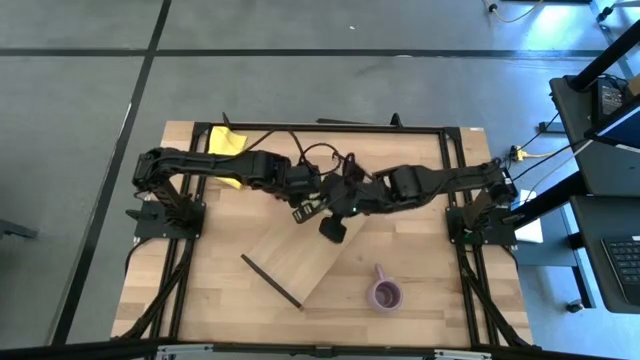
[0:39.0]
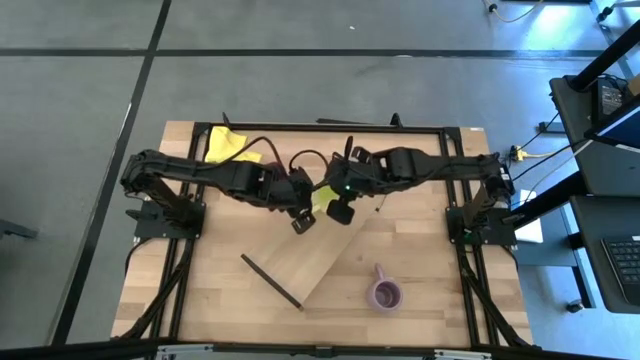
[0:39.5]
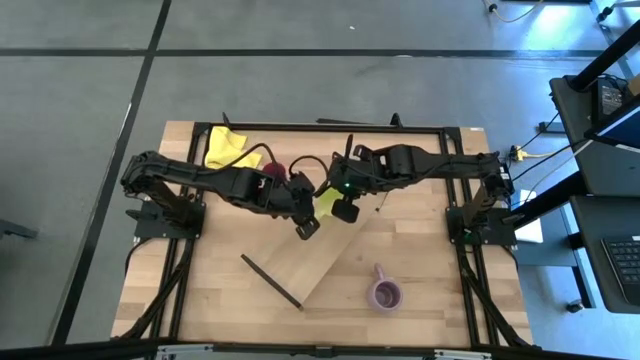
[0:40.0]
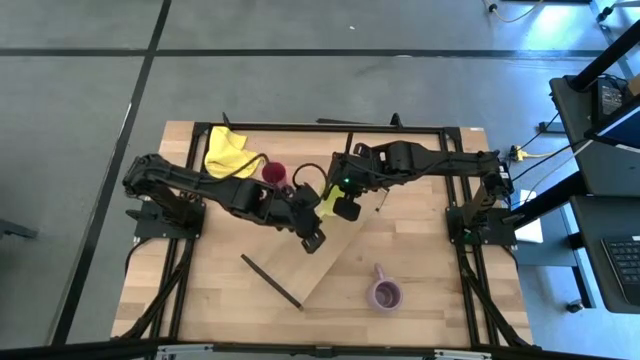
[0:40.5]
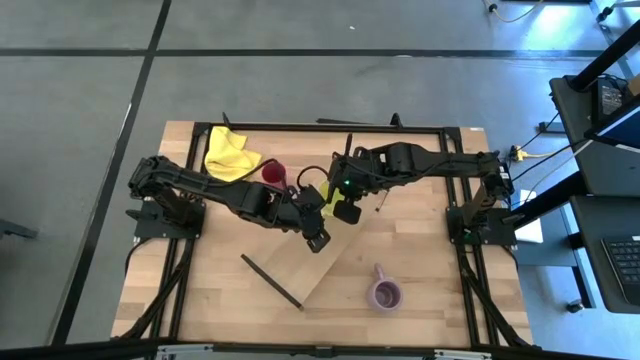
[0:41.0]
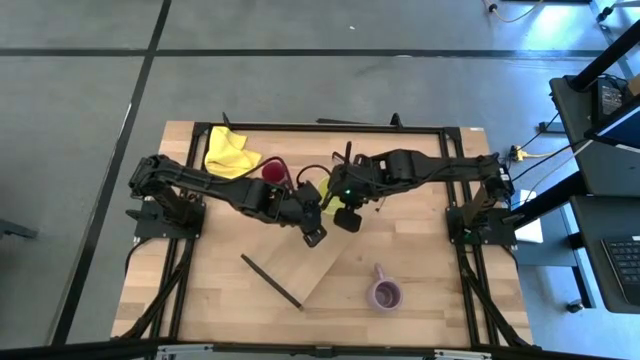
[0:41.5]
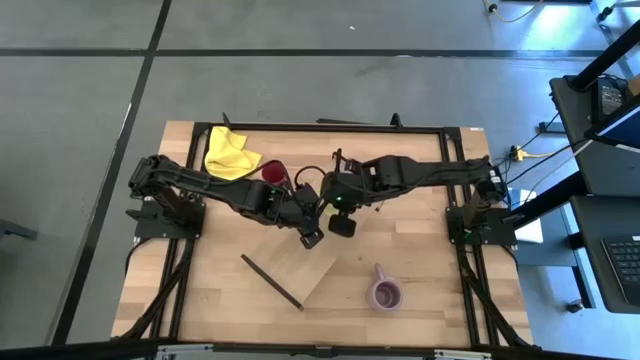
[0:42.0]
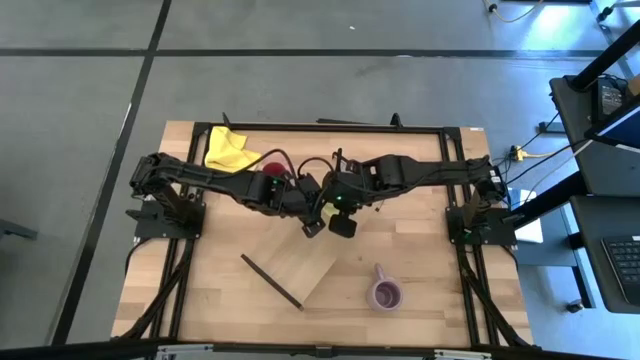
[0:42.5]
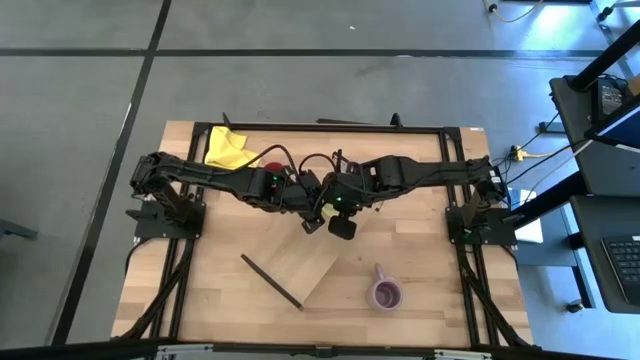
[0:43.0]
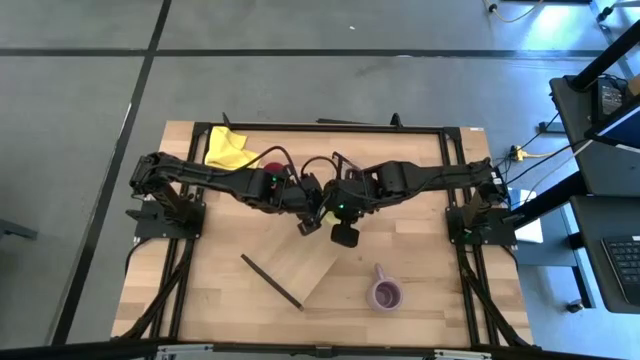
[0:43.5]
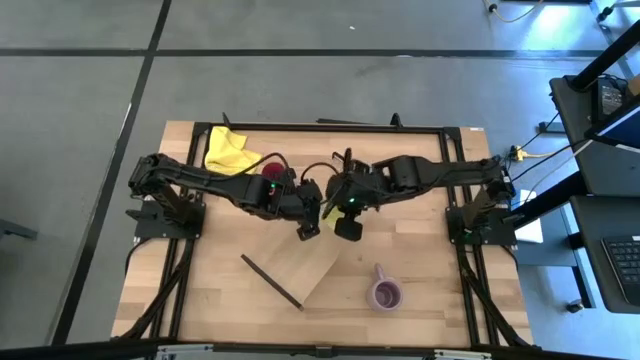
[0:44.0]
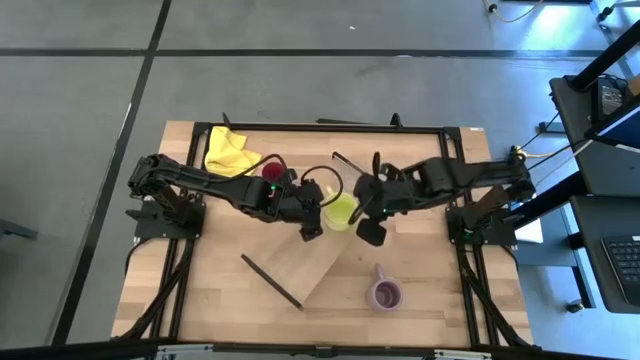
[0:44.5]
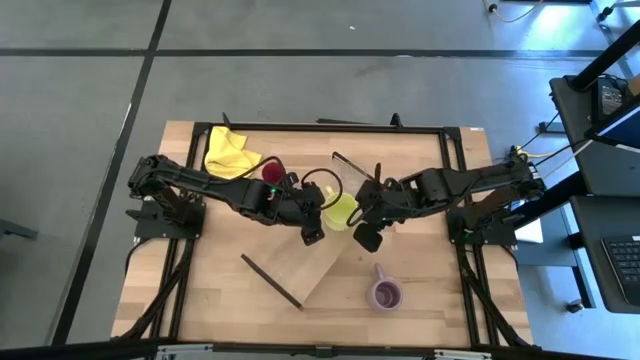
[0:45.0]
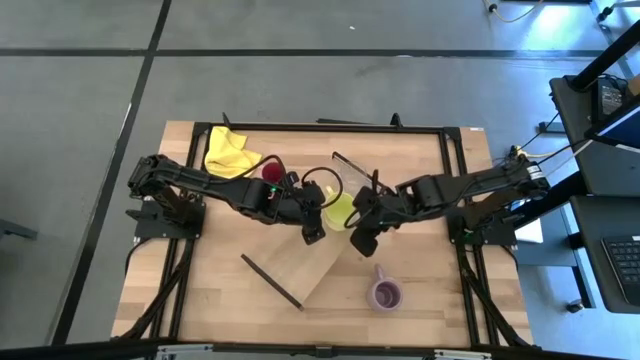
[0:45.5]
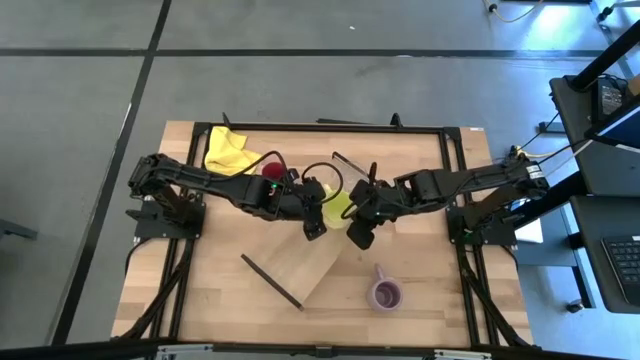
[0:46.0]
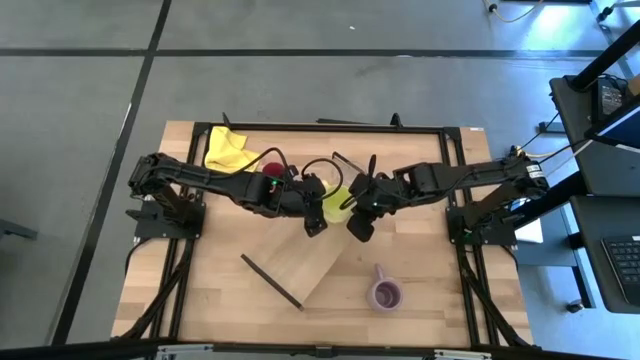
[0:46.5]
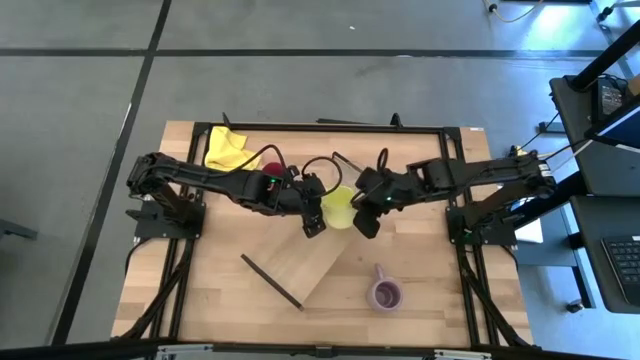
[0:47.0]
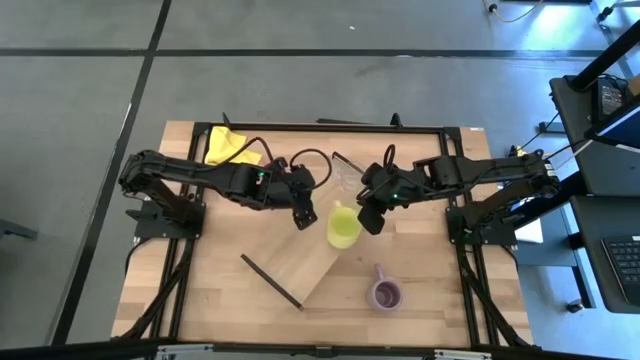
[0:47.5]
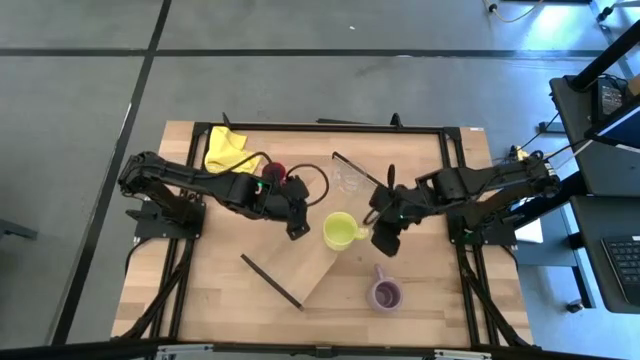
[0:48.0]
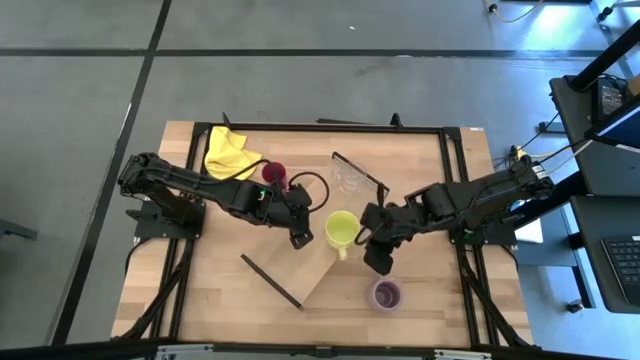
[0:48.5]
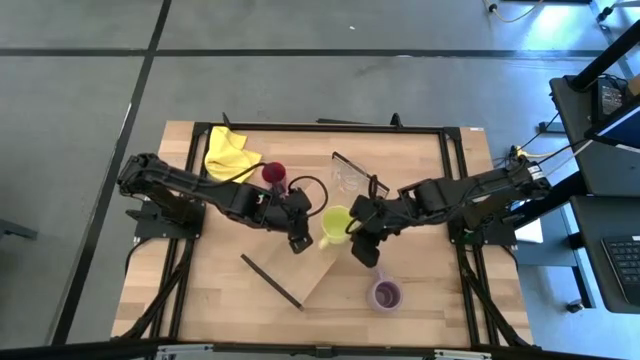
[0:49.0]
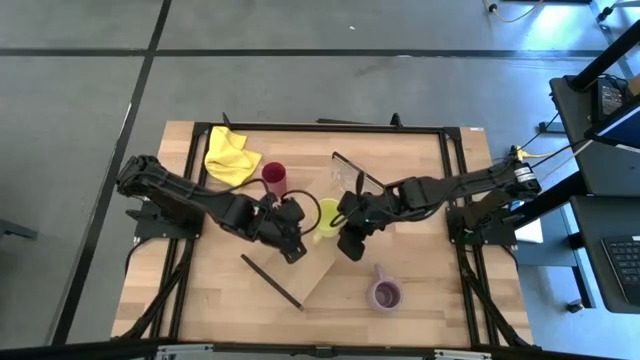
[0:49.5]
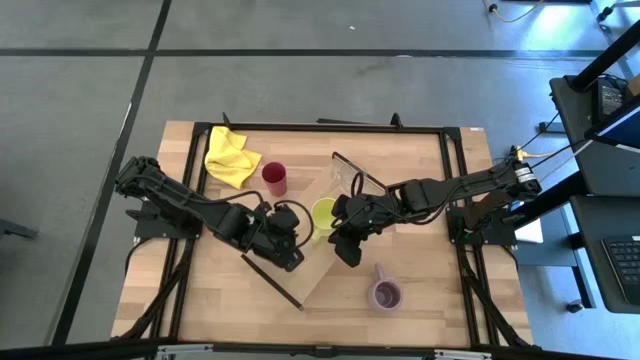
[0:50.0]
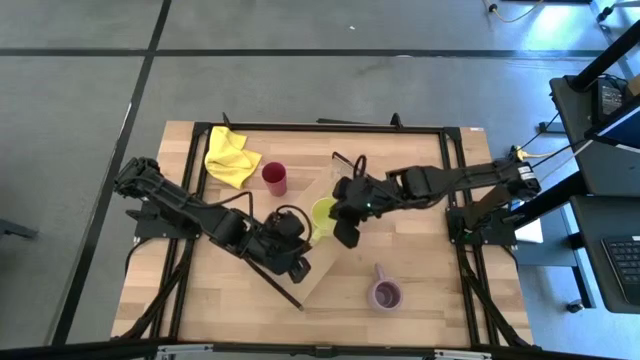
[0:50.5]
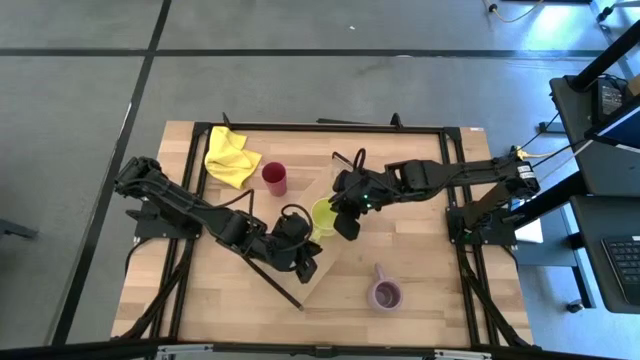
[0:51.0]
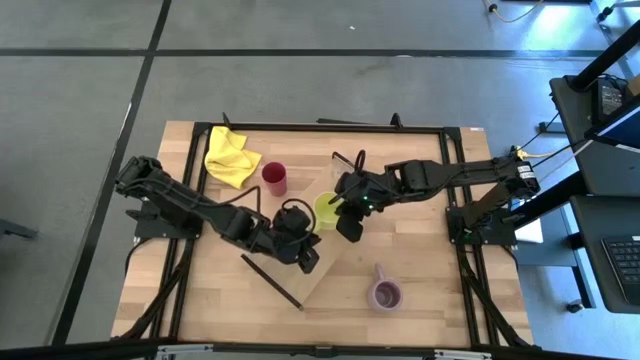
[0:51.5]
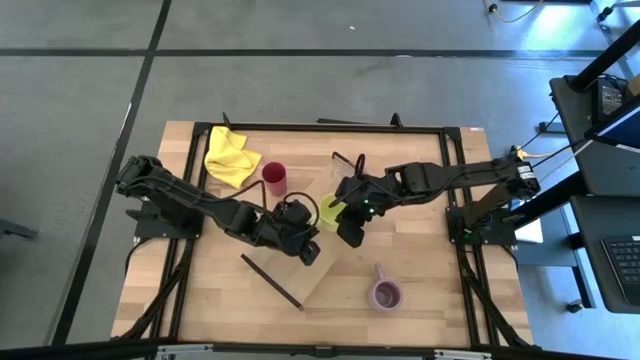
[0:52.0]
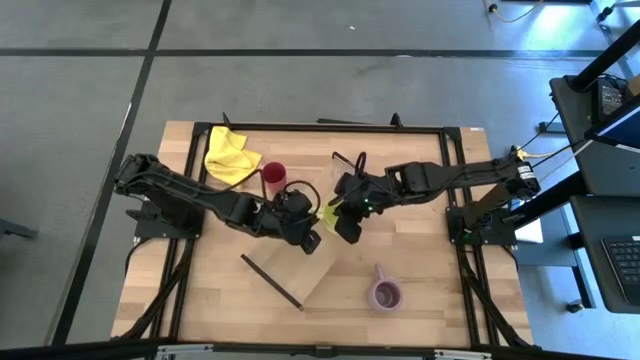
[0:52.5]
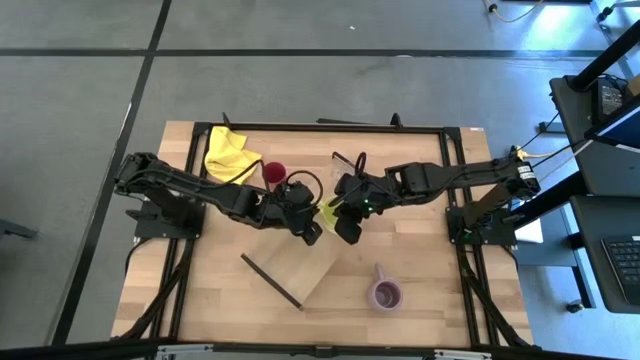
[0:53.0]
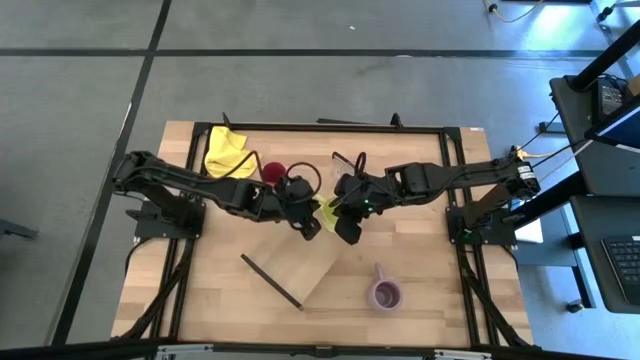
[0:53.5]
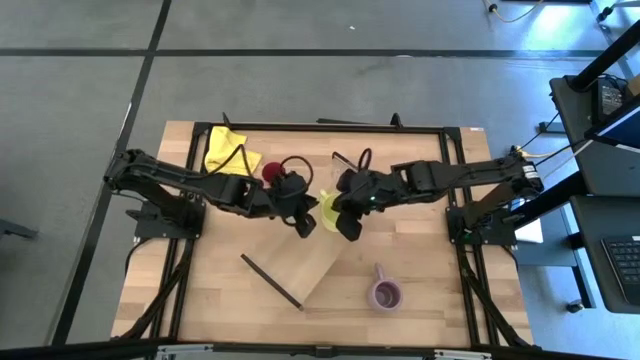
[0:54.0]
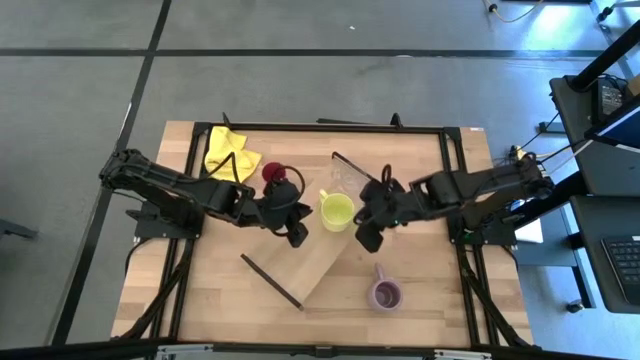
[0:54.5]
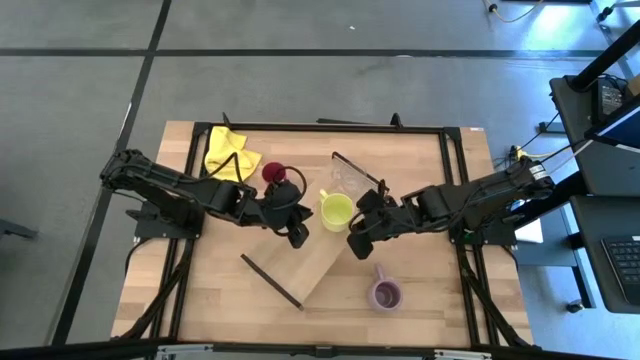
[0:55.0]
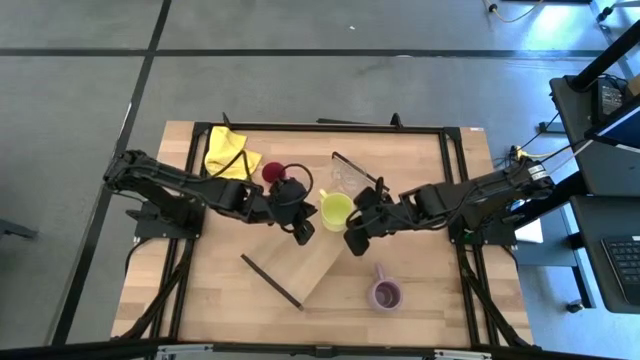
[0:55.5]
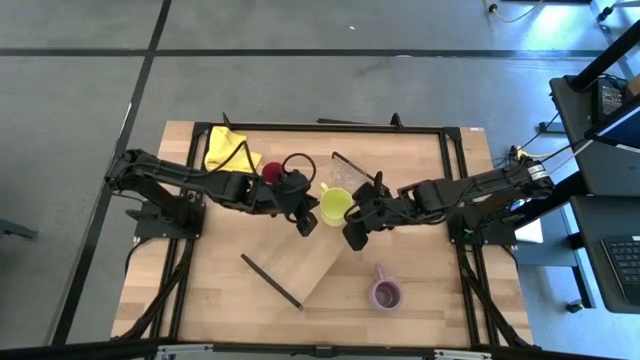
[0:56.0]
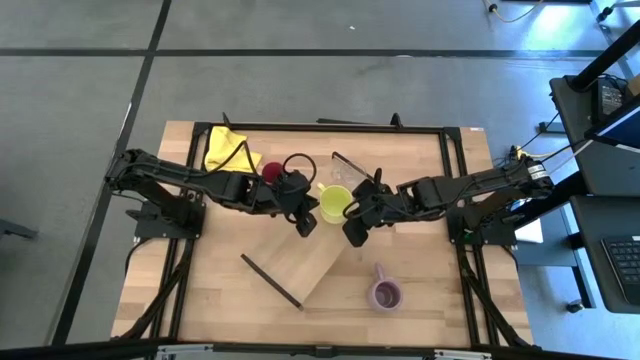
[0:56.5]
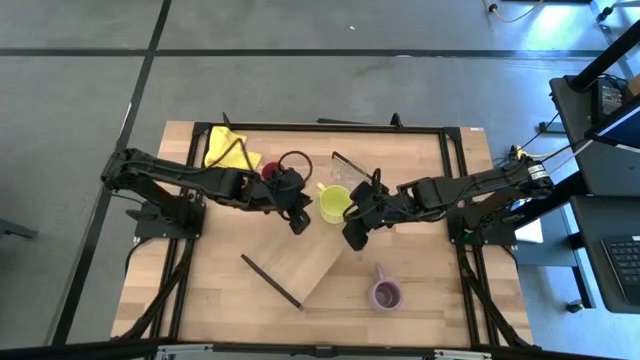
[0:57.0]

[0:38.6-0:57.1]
Task: Stack small to large cups/mugs on shelf
Put the yellow mug on the shelf

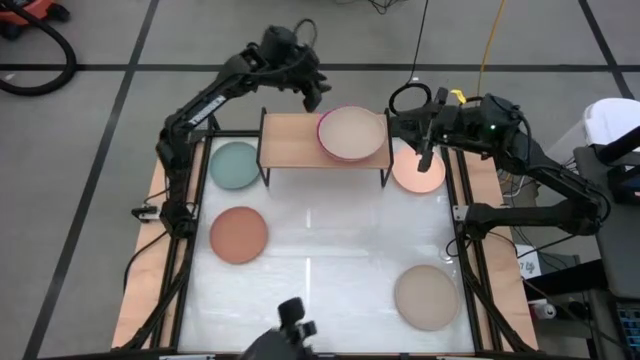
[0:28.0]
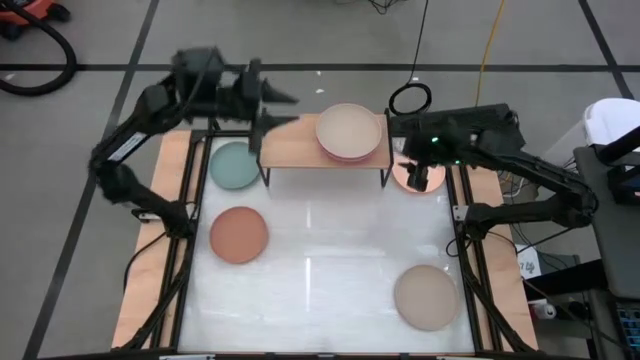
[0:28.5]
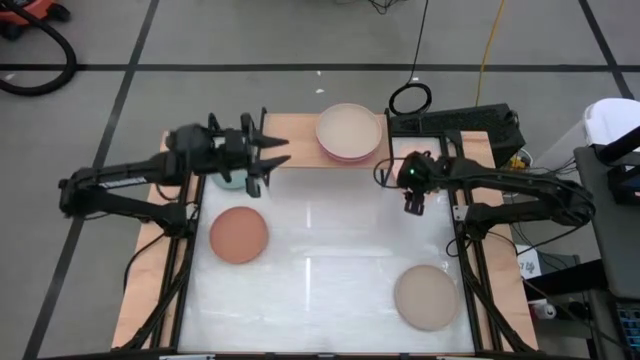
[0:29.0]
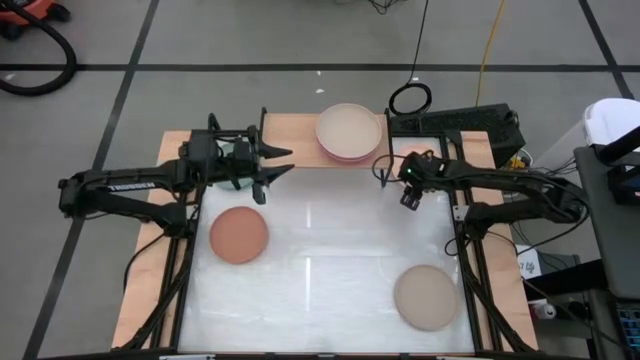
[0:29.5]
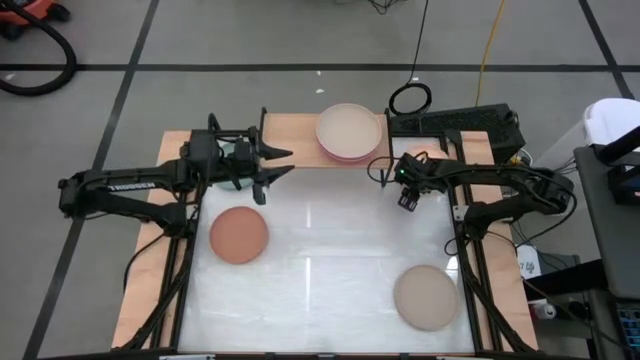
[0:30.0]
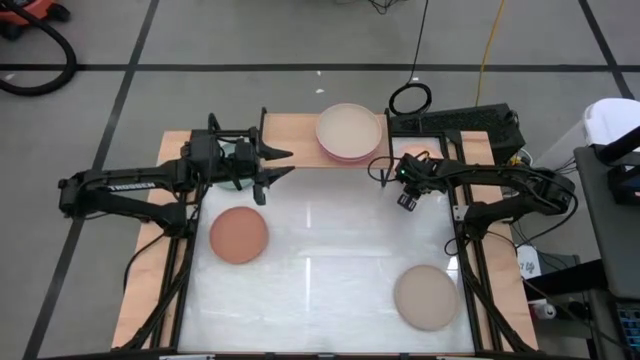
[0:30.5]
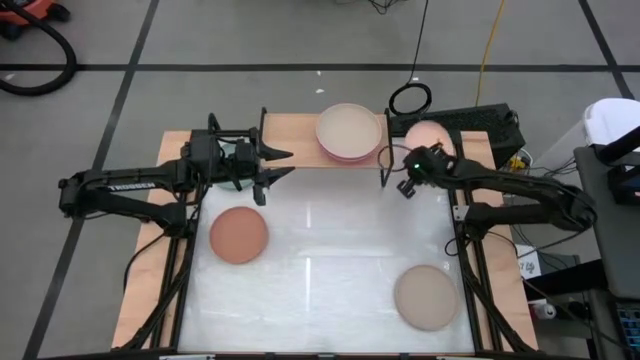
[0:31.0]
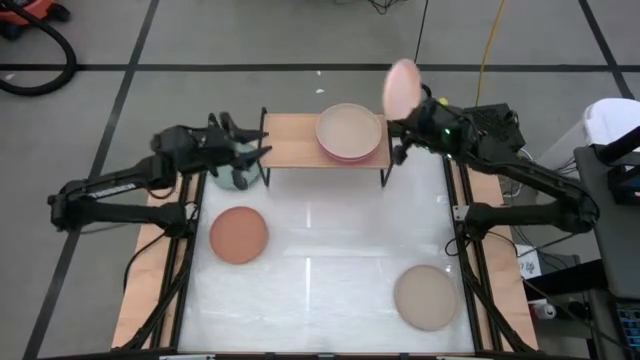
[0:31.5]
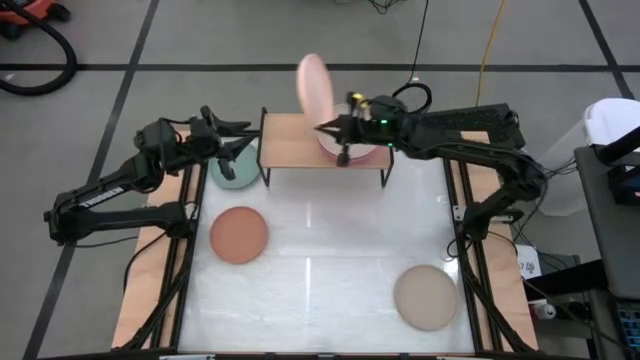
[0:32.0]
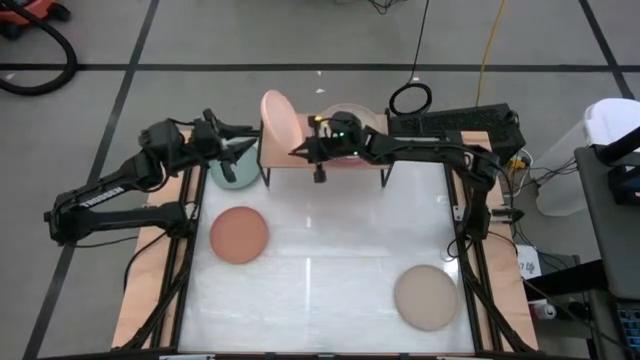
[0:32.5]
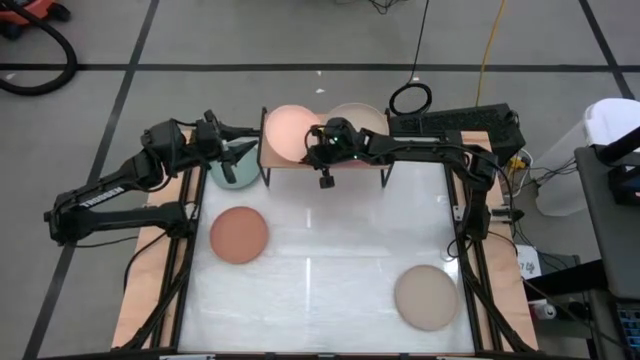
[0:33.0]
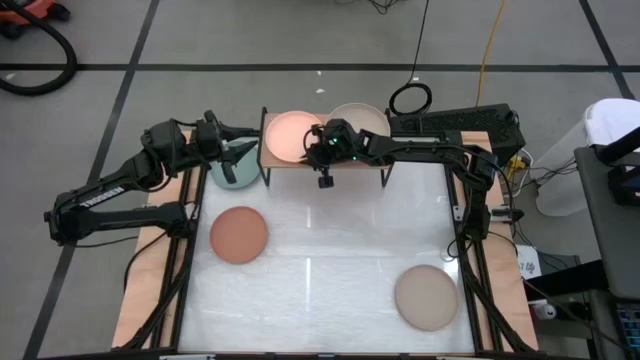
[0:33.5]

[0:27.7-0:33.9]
Task: Place and stack plates onto a shelf
Put the light orange plate on the shelf
